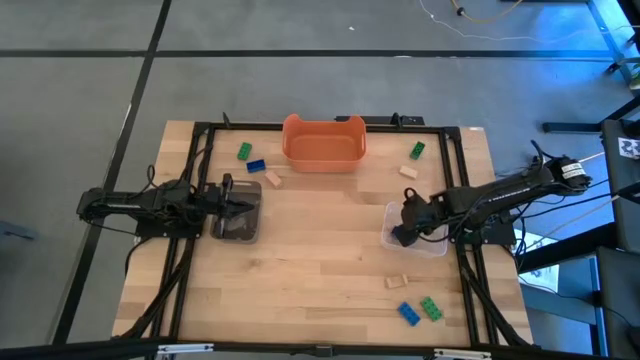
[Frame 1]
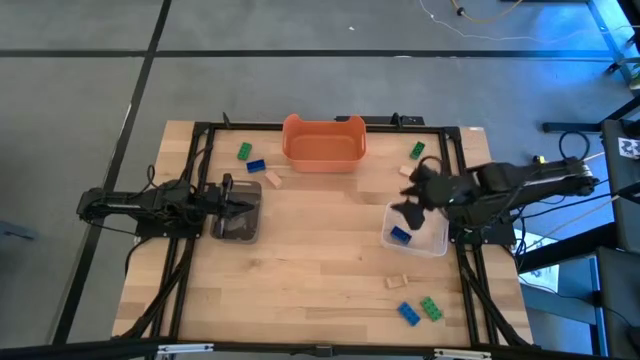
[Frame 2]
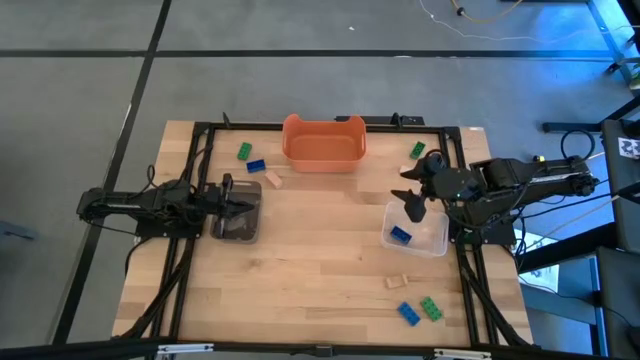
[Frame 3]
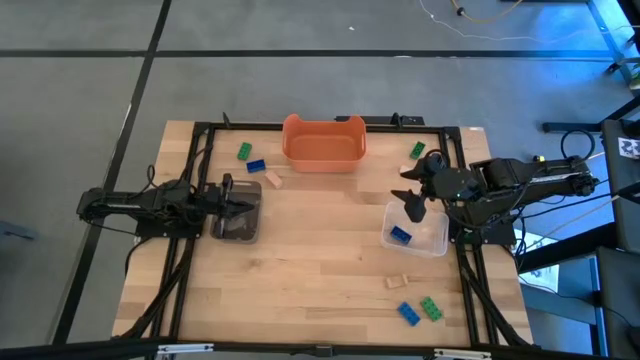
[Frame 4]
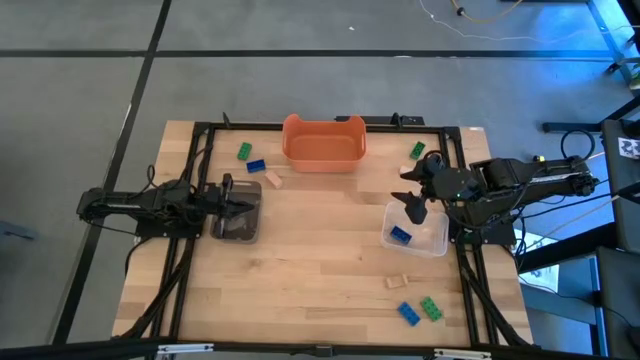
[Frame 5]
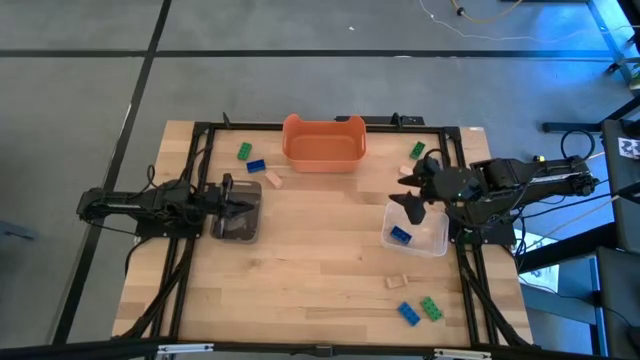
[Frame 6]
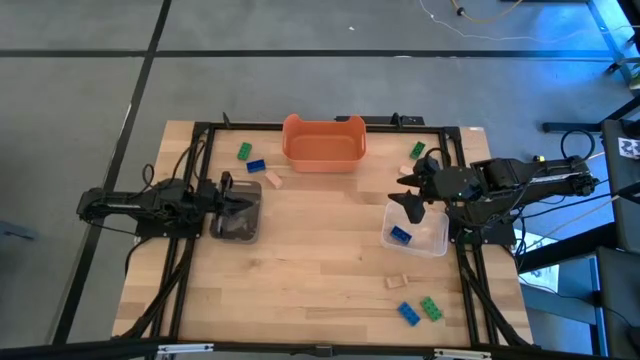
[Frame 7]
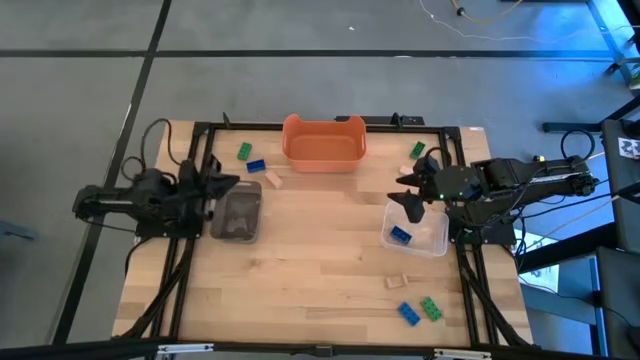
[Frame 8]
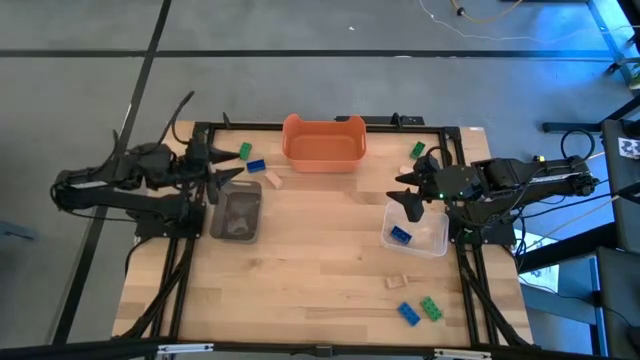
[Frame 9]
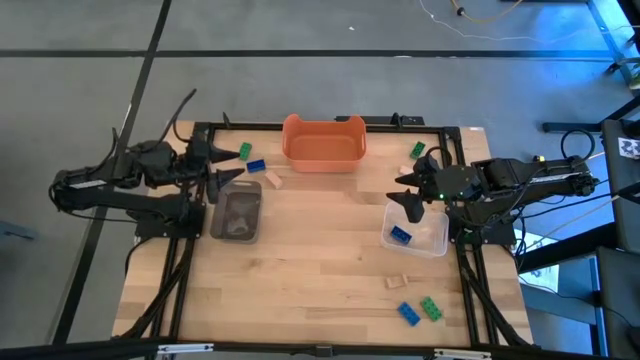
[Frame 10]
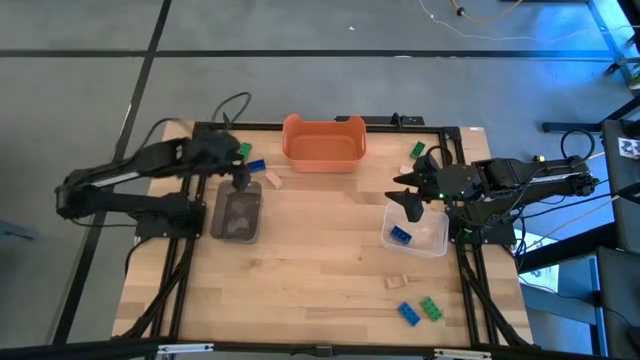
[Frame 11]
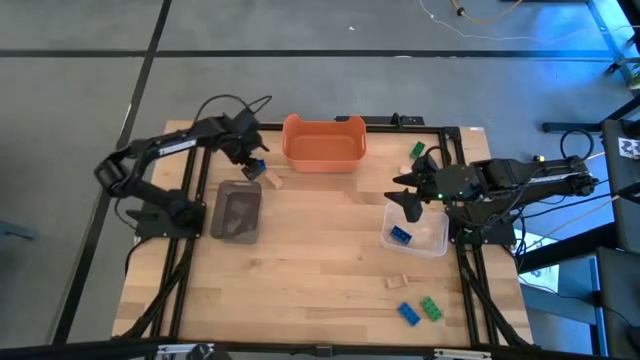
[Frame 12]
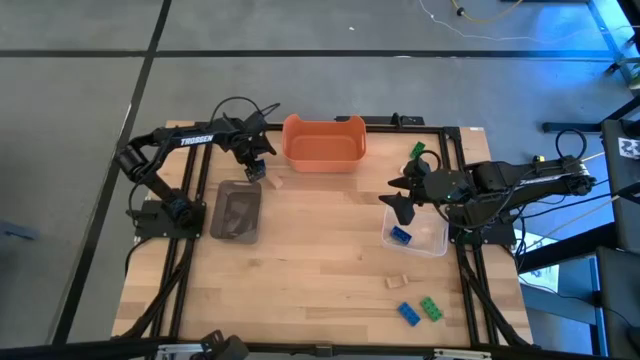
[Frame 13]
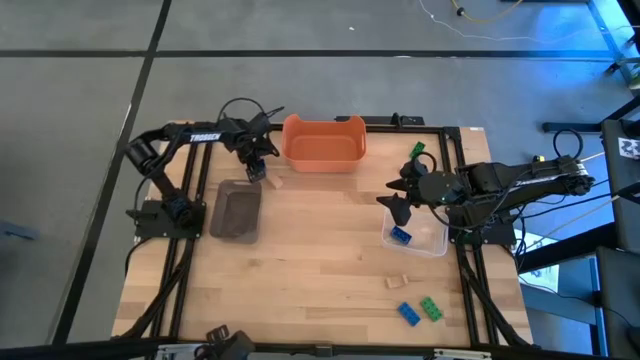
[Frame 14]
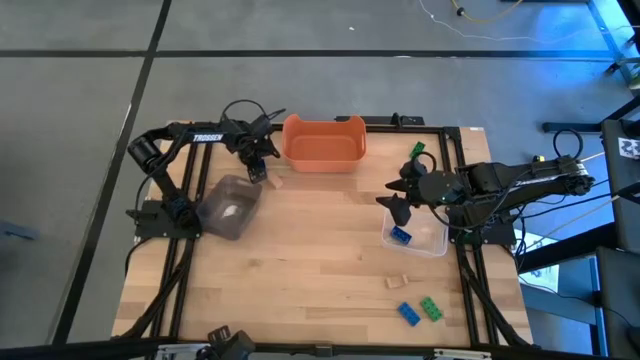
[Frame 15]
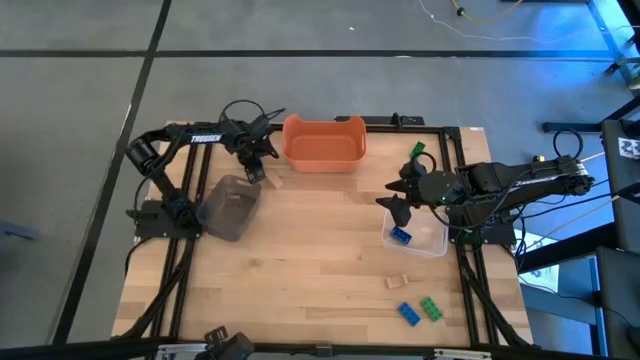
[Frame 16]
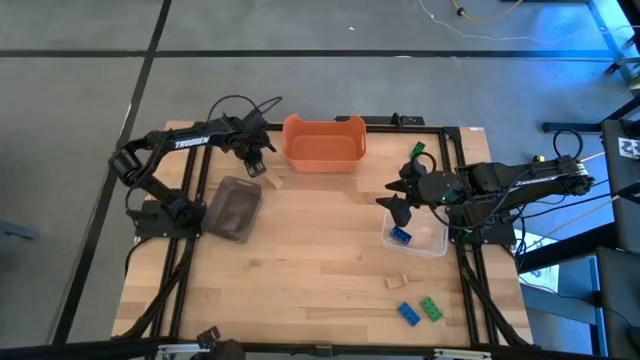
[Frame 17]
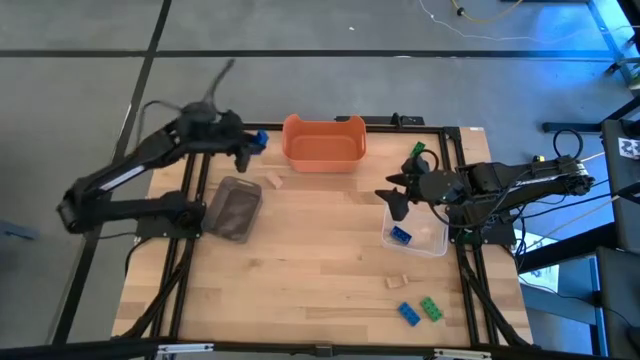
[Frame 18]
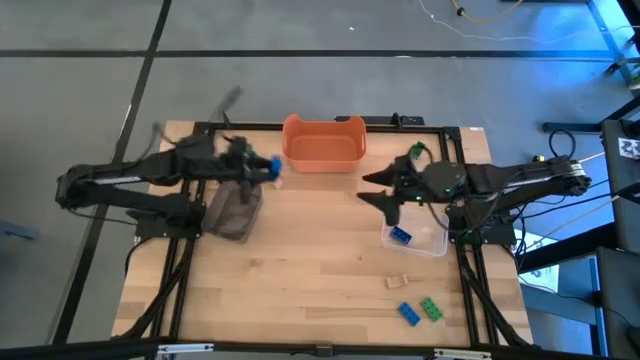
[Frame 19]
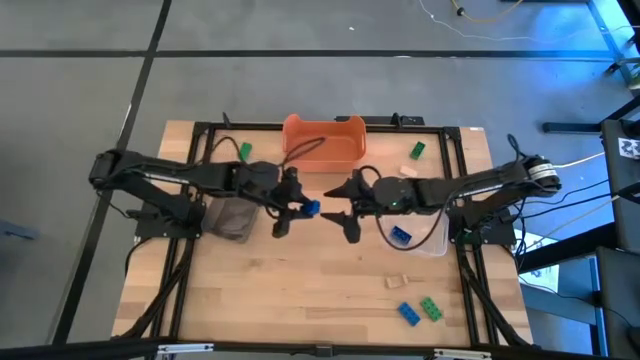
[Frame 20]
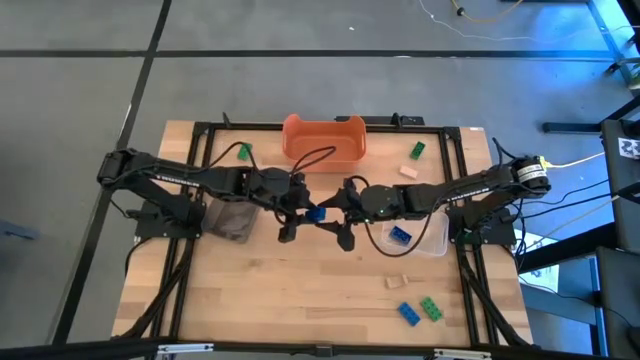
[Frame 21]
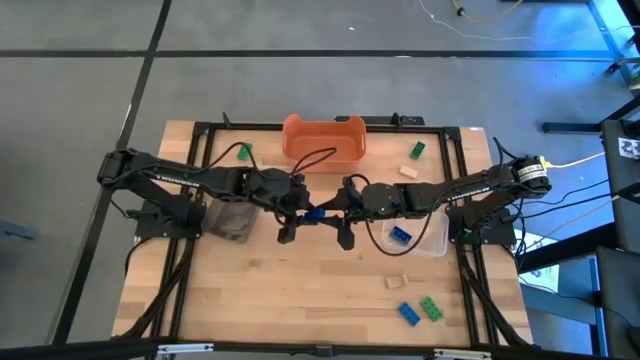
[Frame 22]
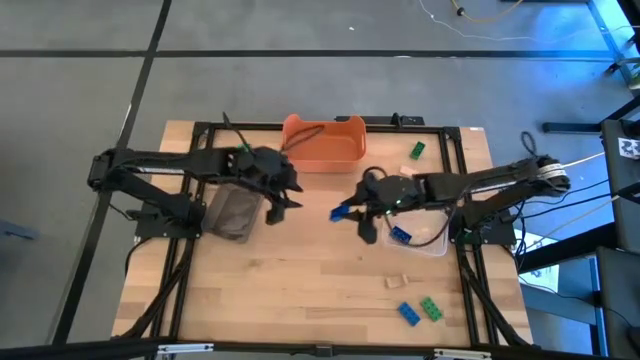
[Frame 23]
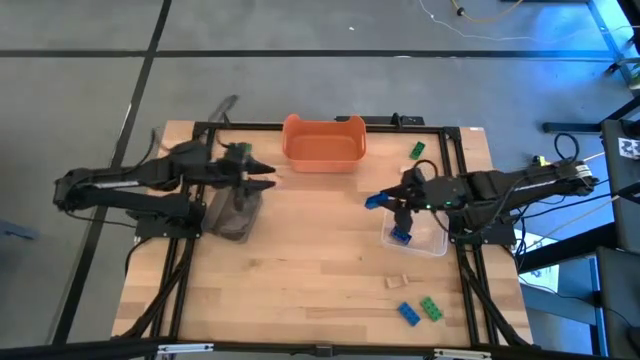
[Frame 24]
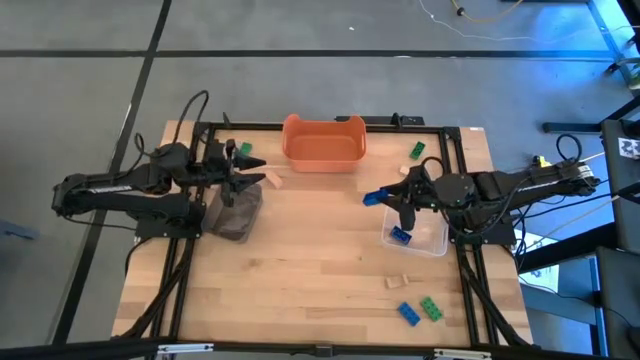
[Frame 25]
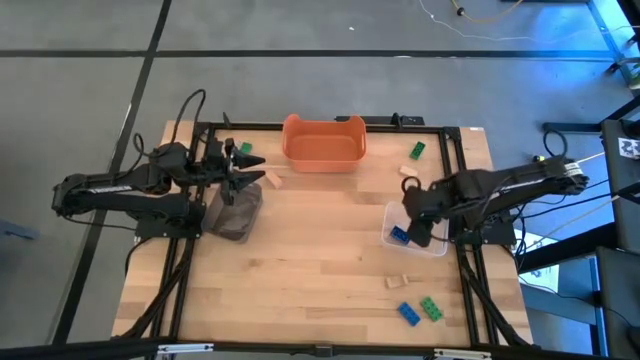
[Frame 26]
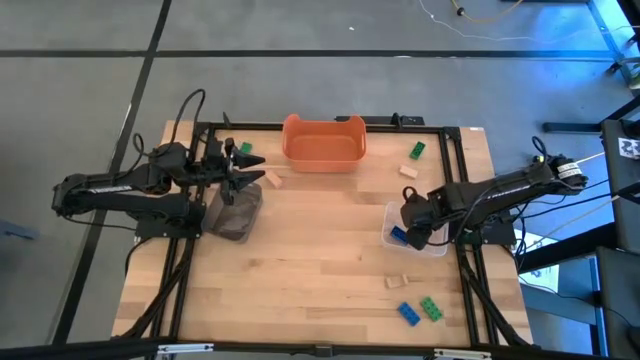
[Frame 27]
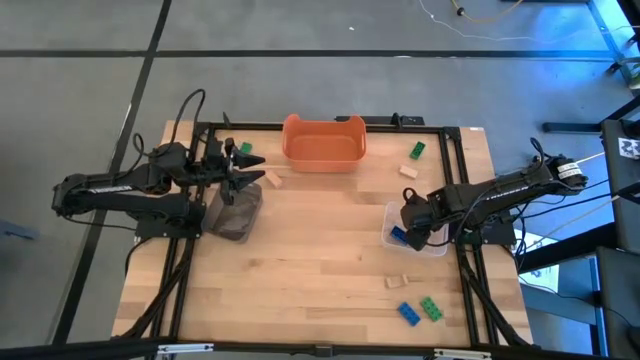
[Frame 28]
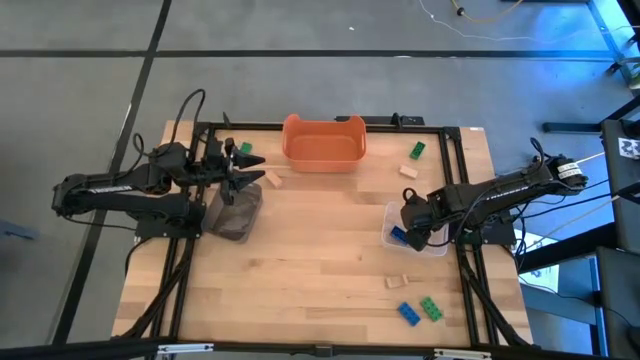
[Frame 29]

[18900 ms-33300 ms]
Task: Sort & place blocks by color
Put the top blue game piece into the transparent bin

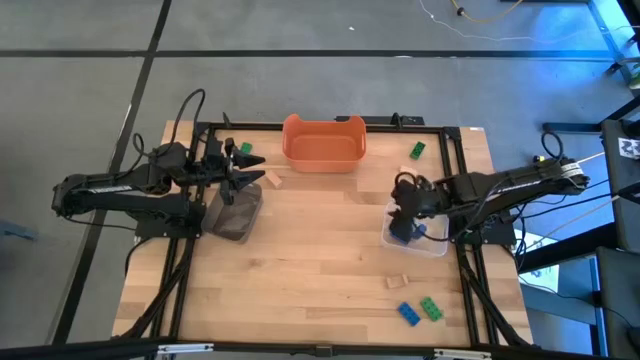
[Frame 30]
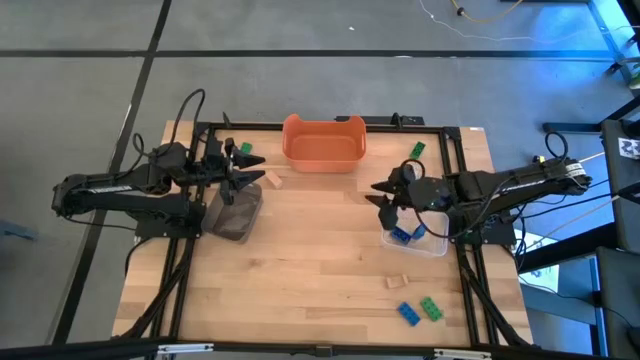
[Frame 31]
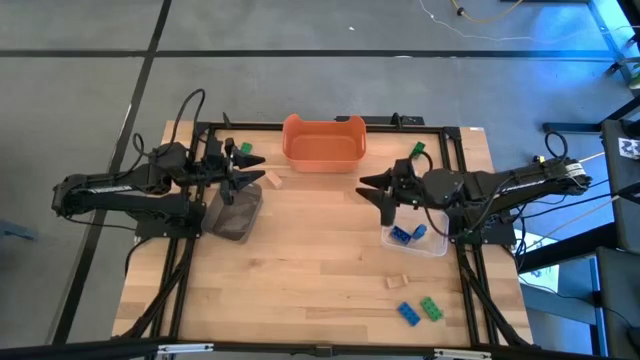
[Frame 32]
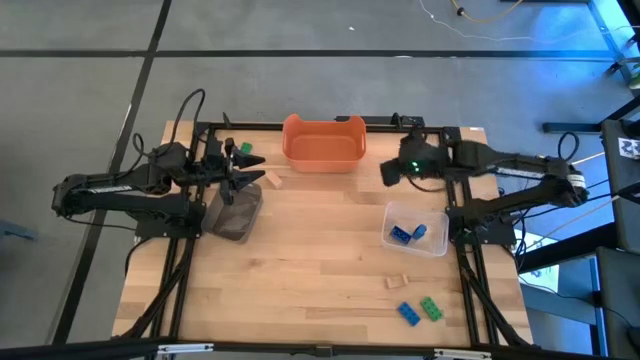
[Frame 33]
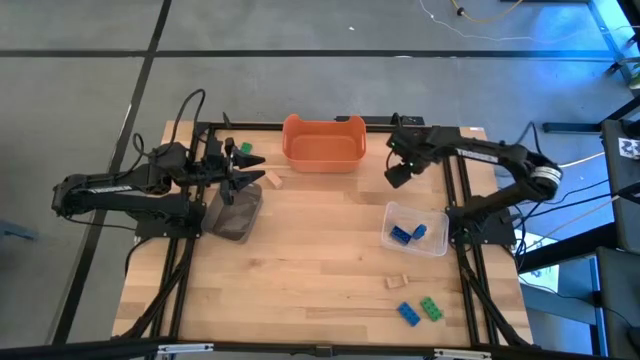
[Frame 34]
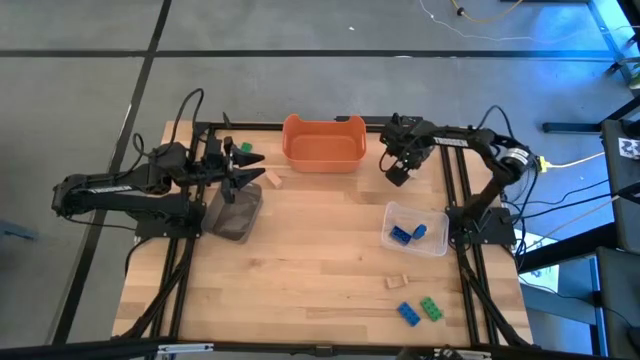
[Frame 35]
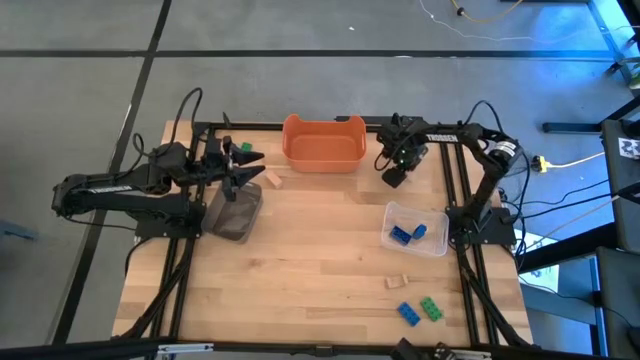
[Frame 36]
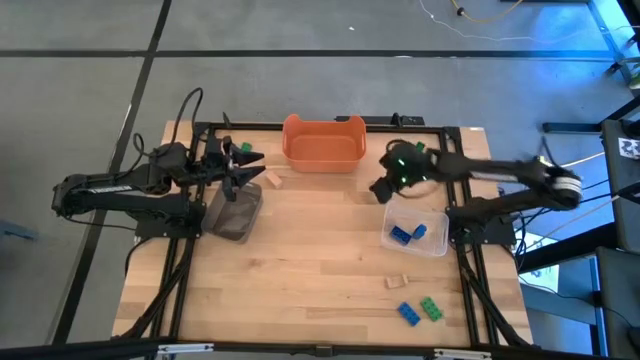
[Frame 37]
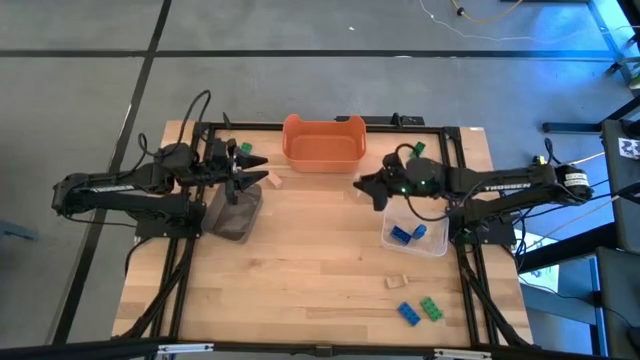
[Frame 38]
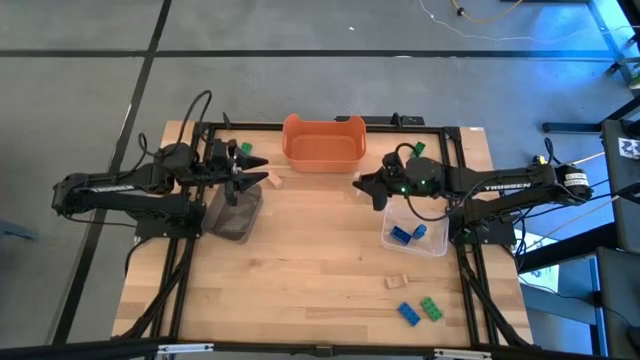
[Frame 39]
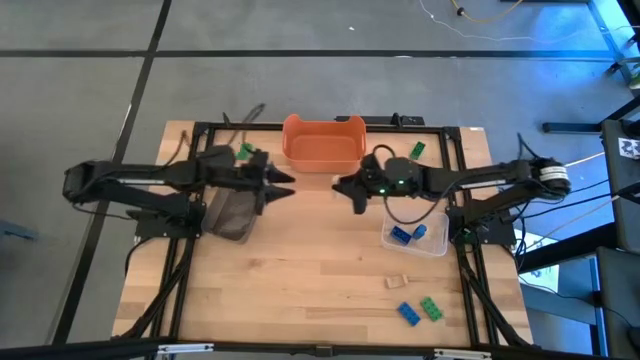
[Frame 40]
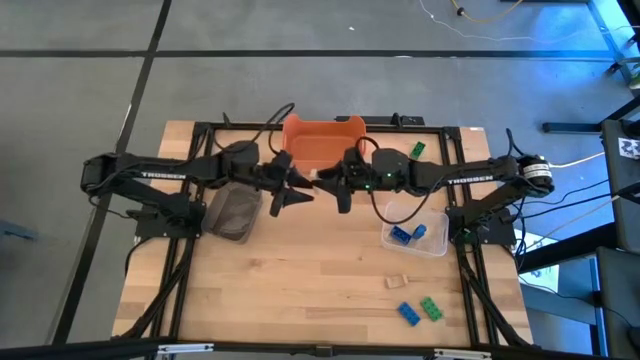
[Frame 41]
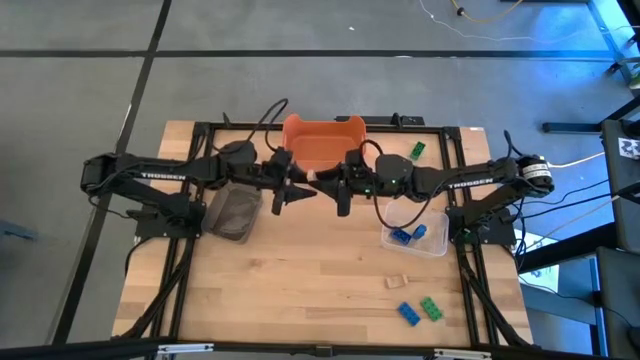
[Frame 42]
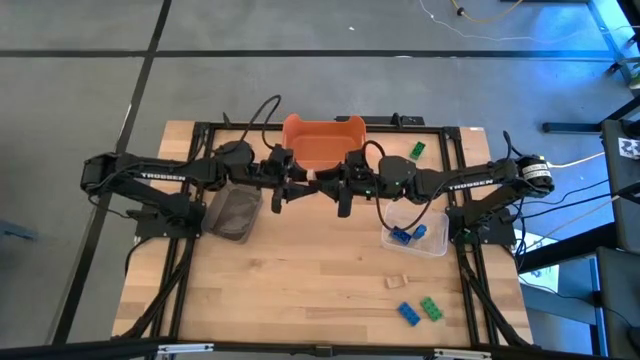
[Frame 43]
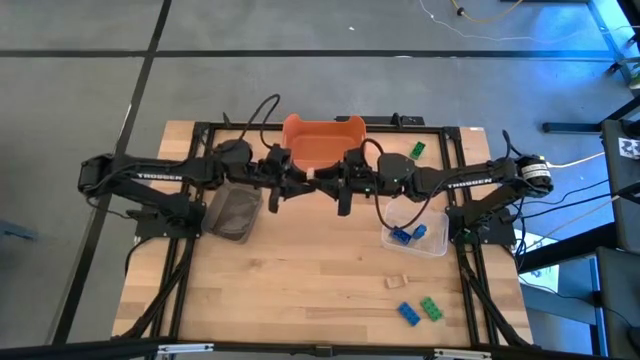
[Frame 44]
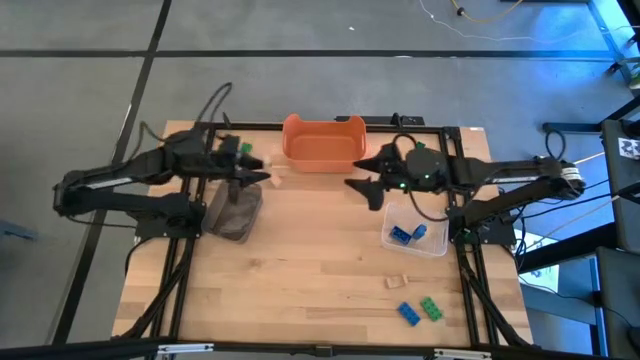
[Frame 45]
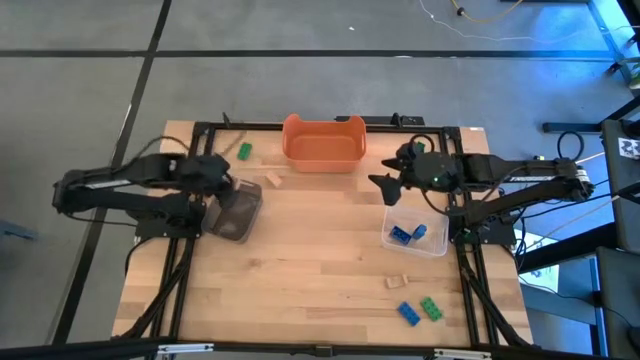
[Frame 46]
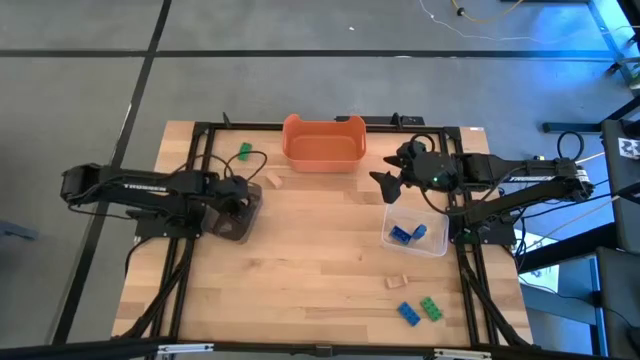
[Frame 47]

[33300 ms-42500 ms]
Put the top right brown block into the black bin
